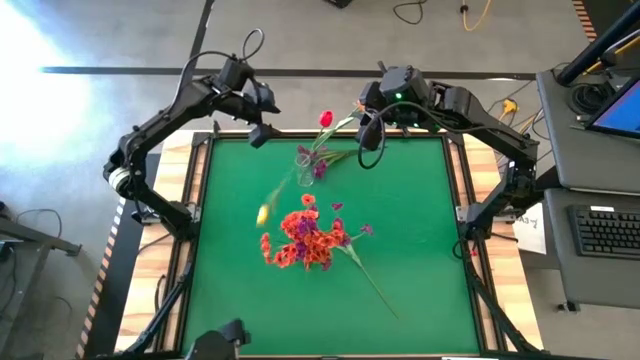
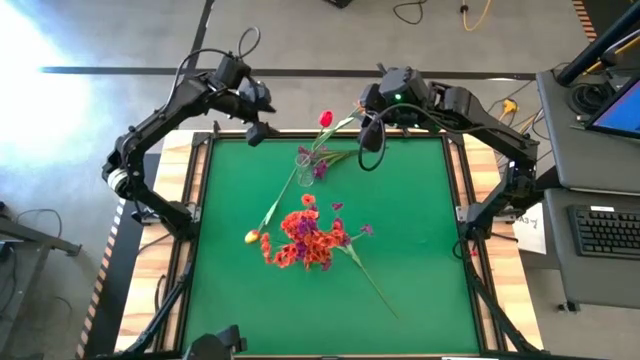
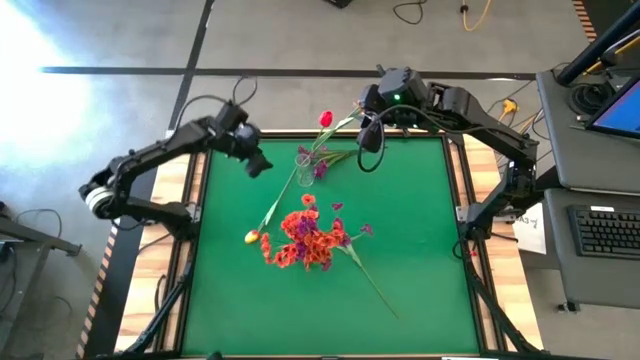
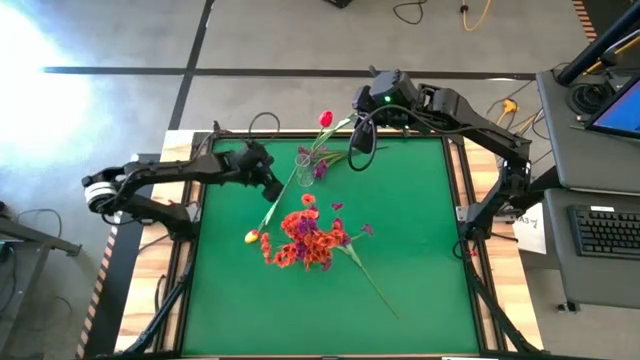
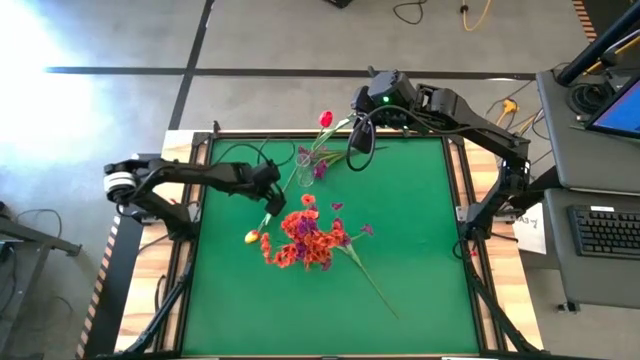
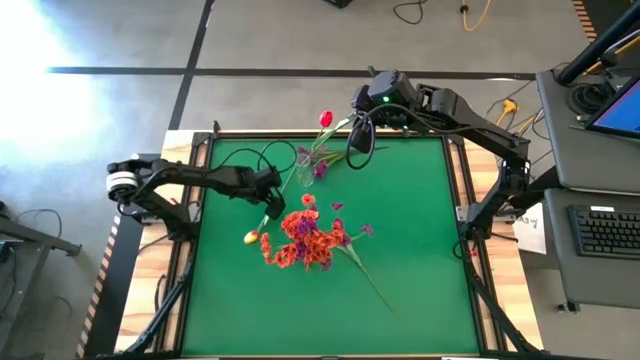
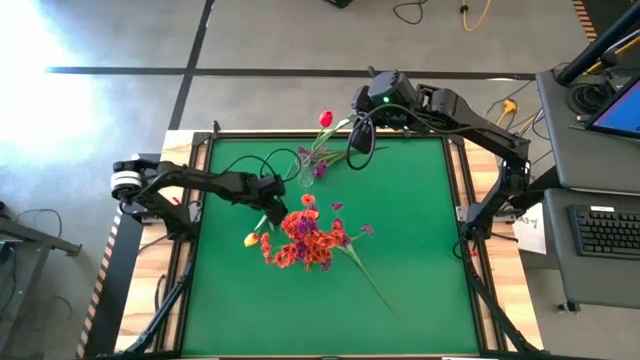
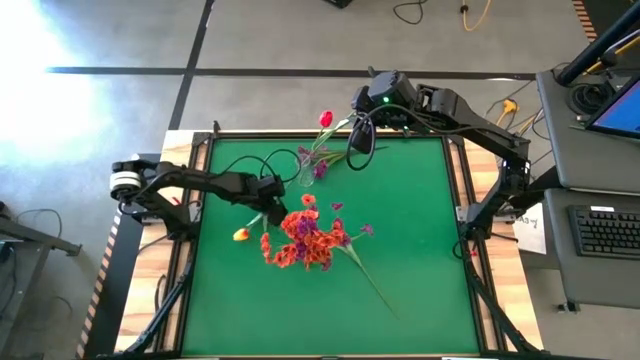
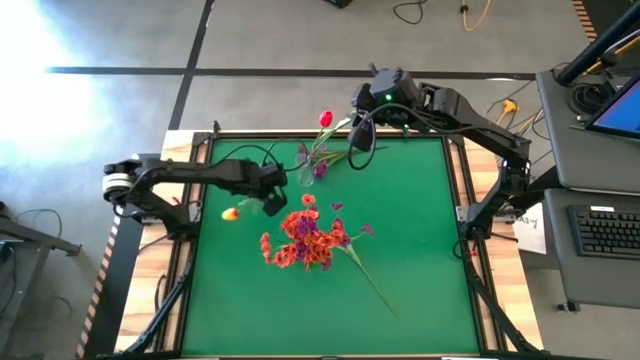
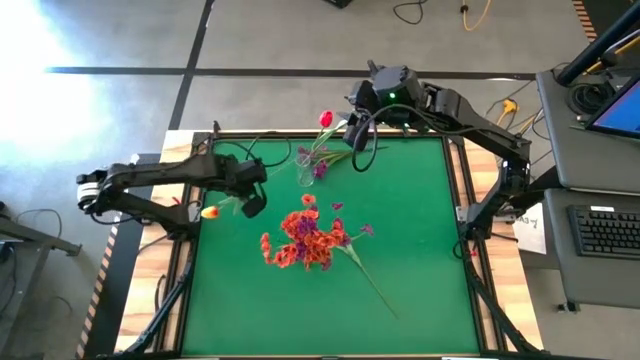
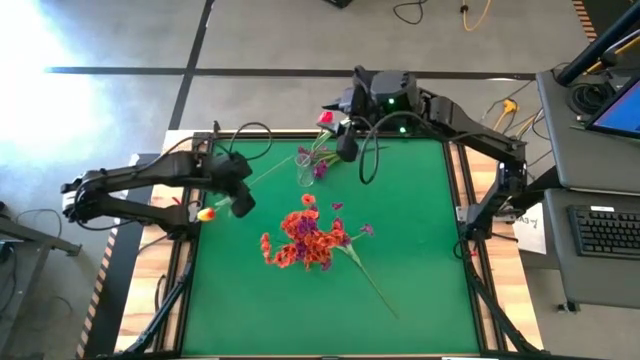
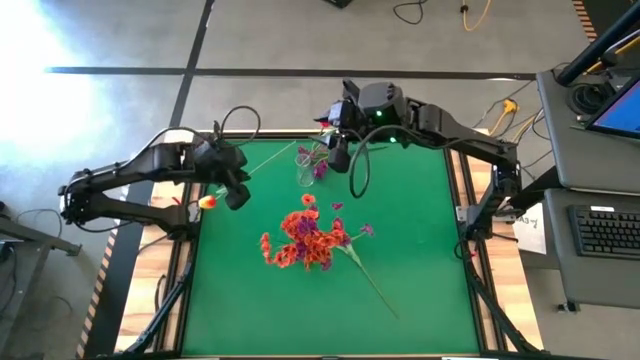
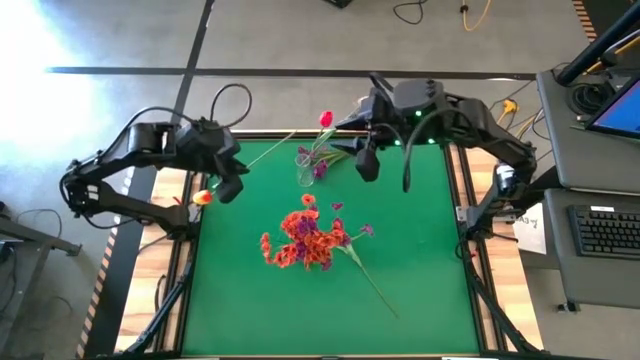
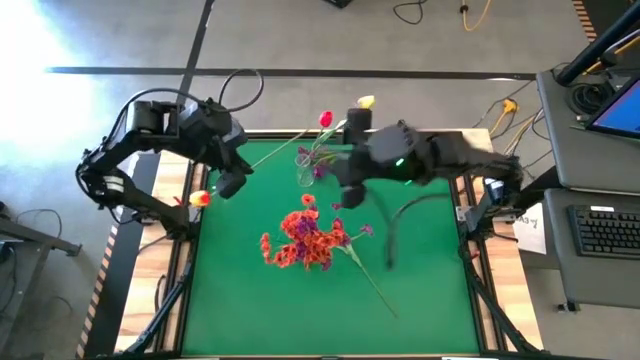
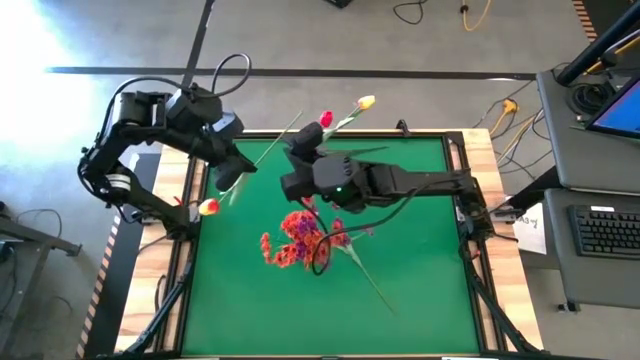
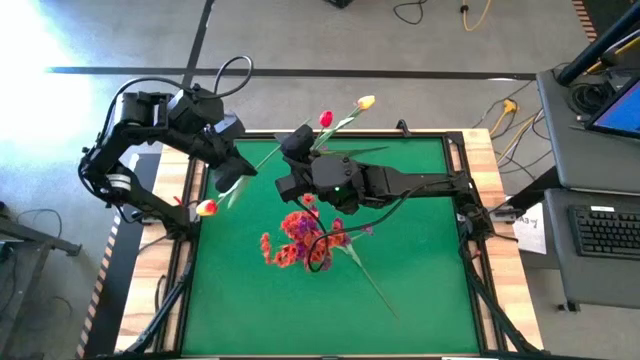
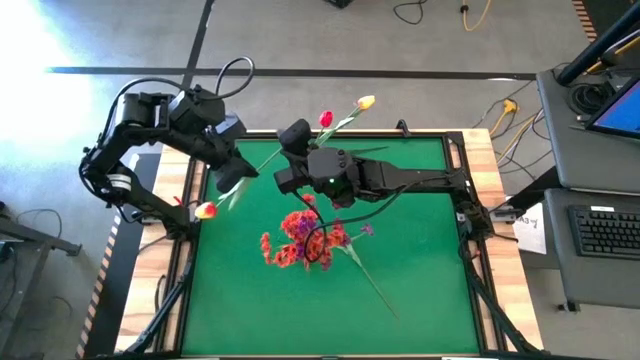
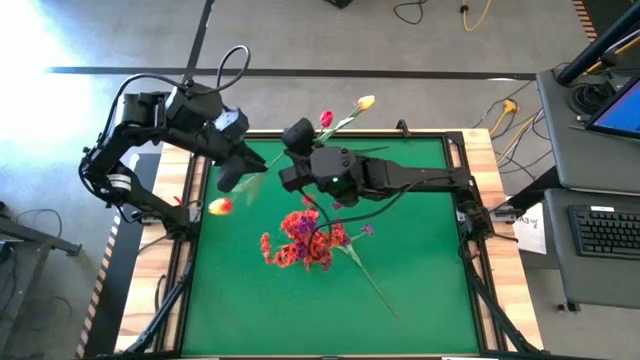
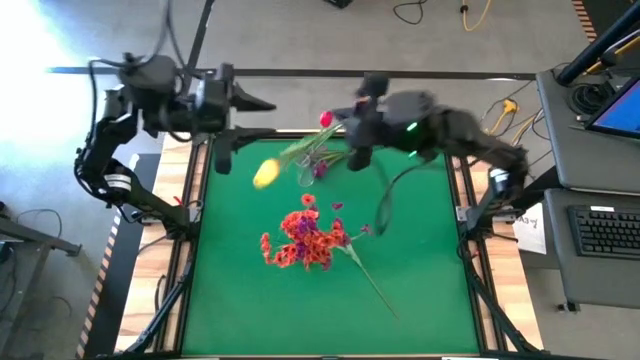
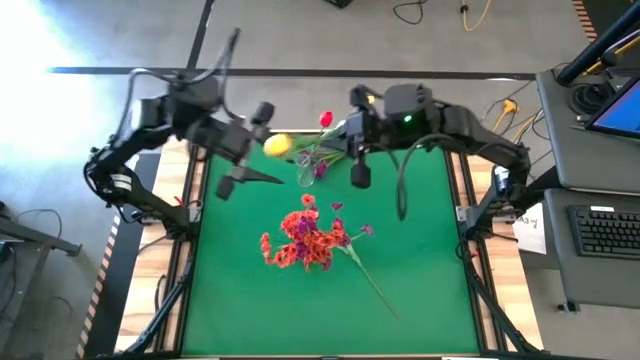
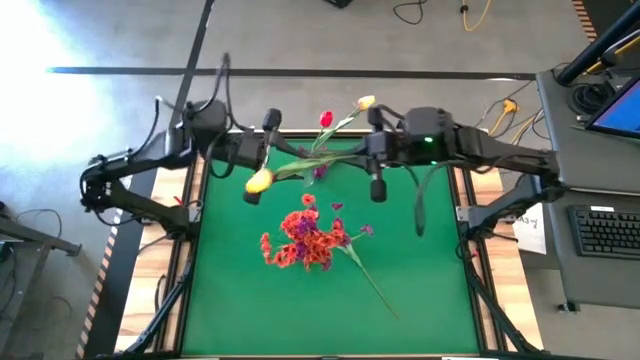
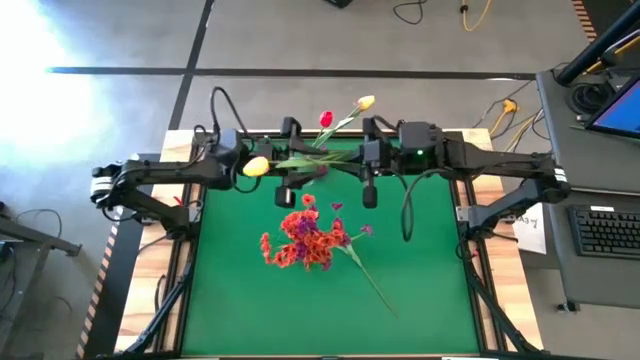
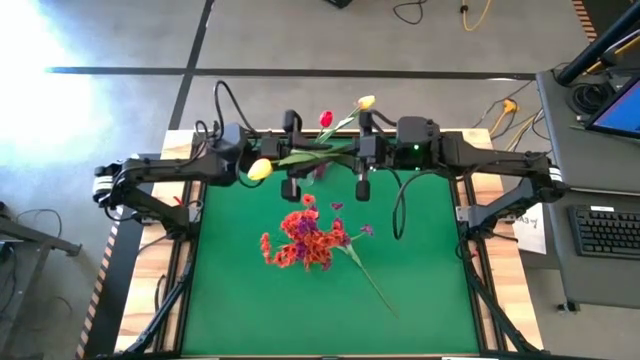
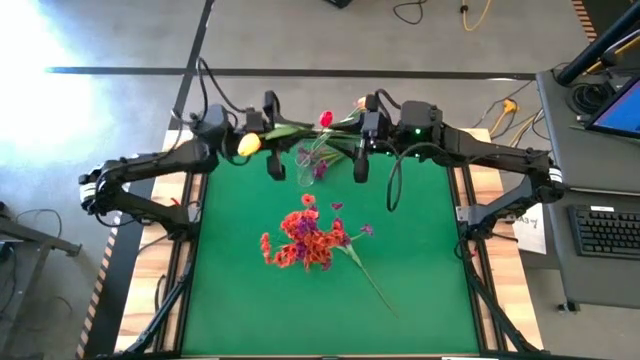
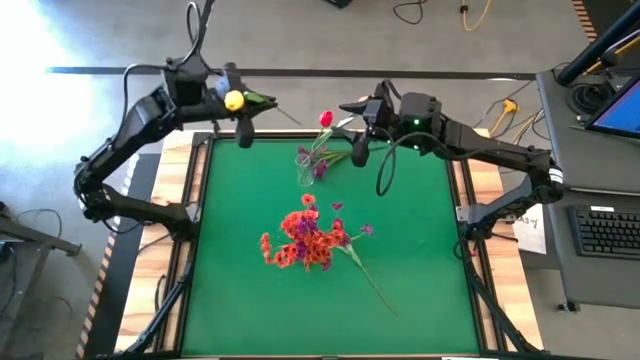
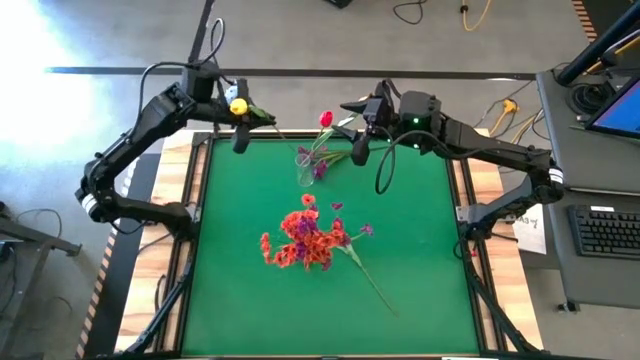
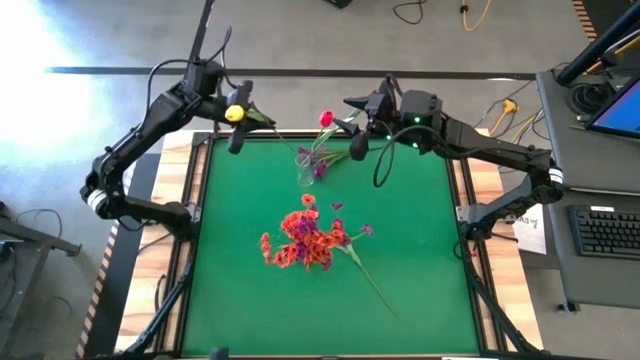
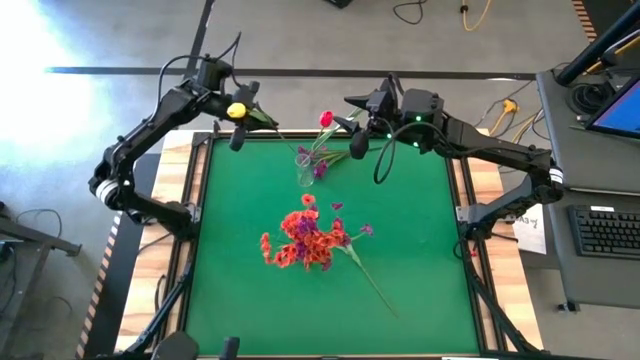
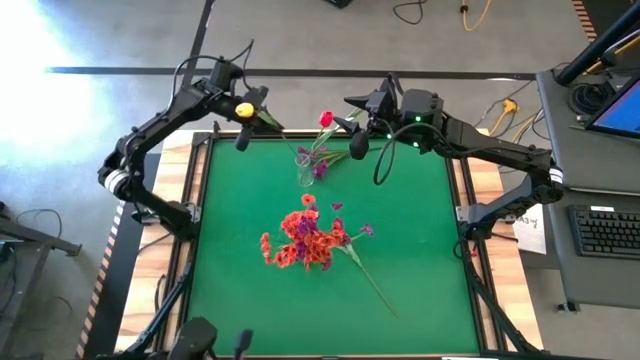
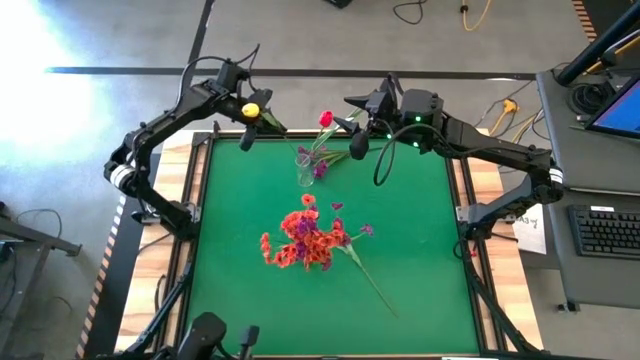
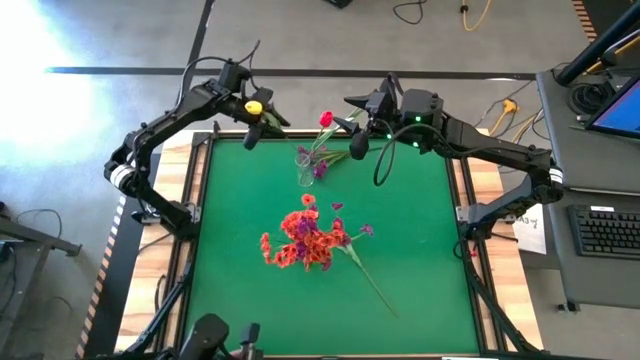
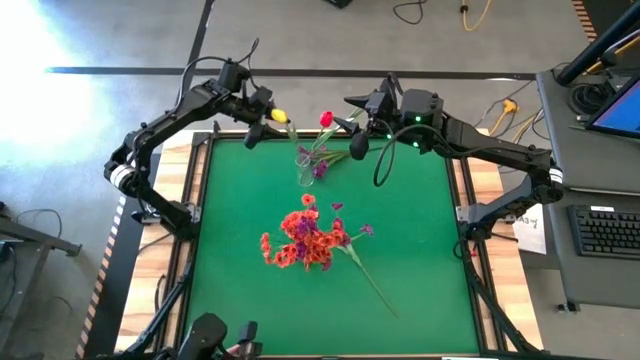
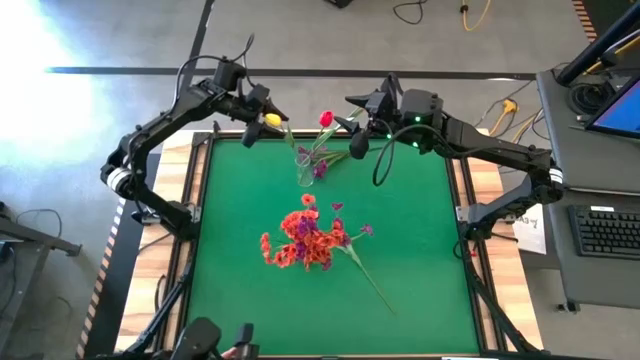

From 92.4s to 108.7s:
Task: Sort flowers into vase by color
Put the yellow tulip into the transparent vase

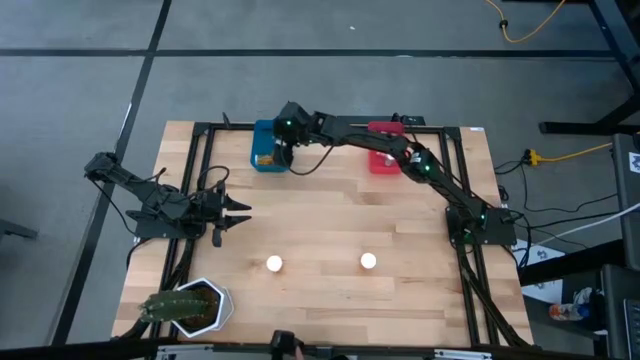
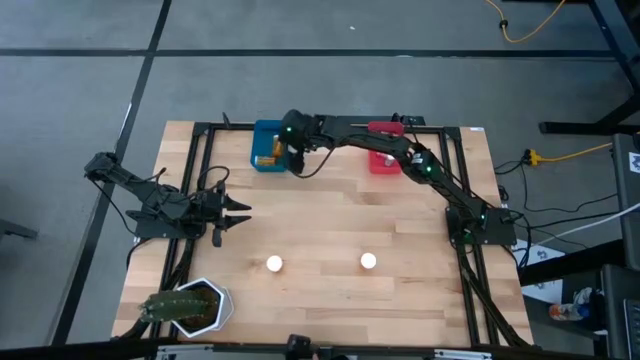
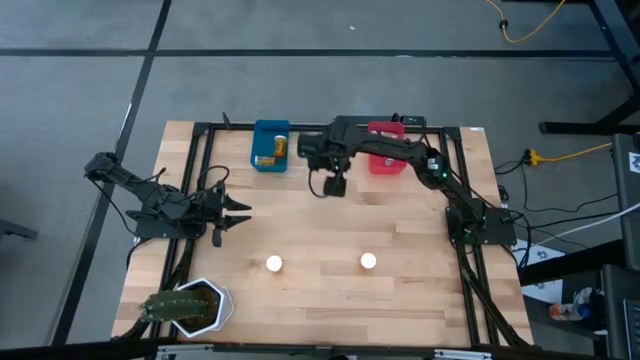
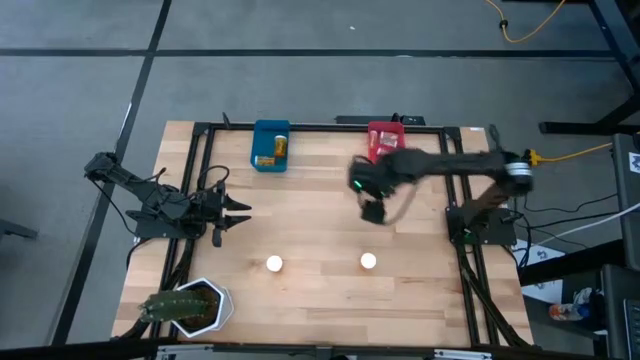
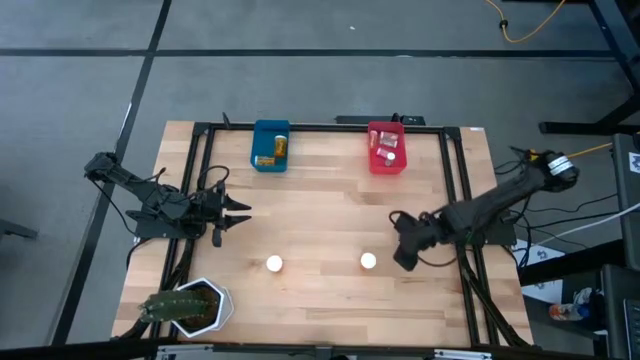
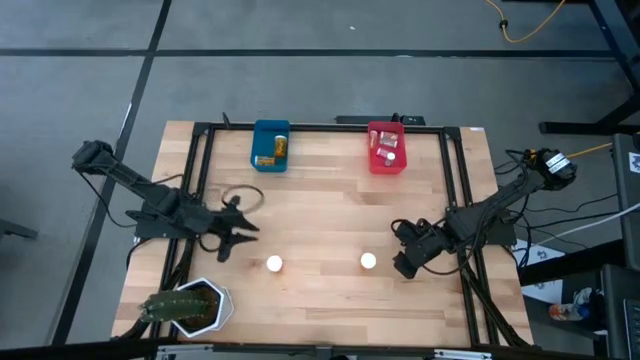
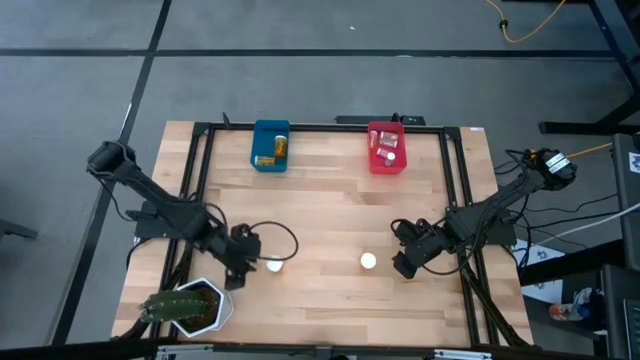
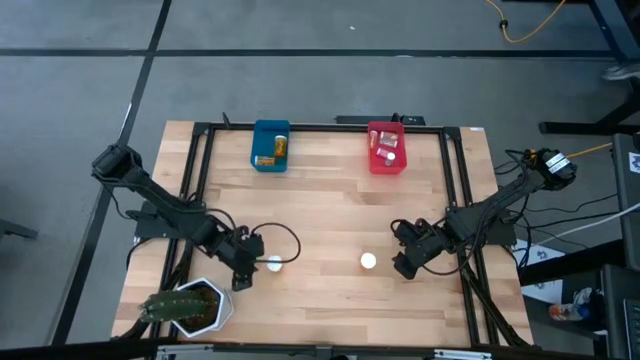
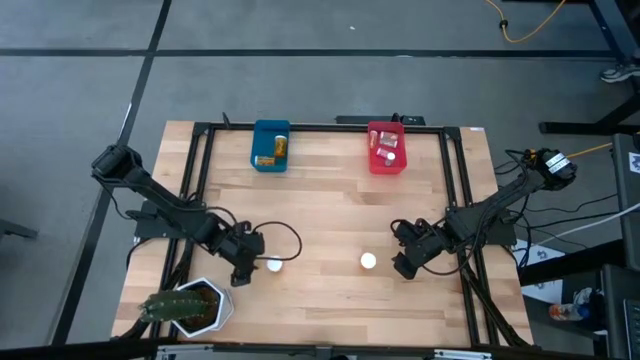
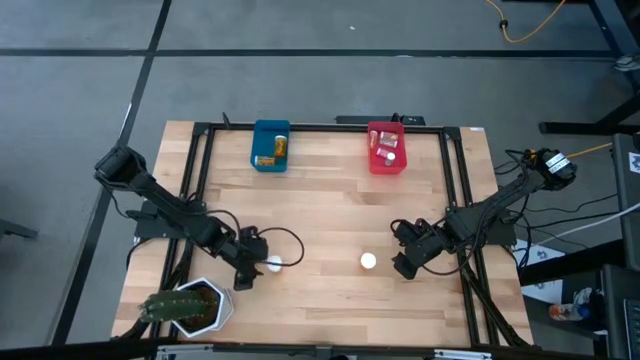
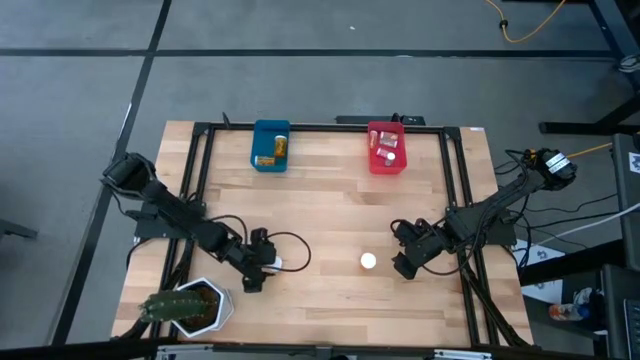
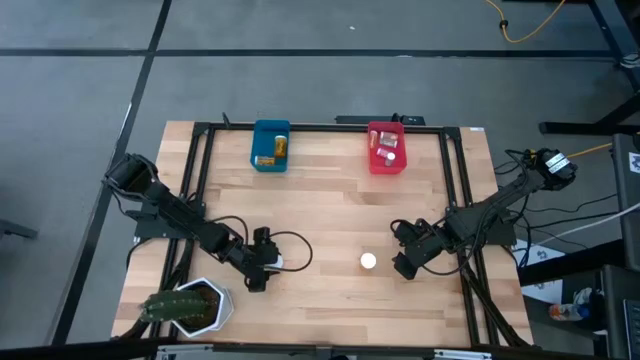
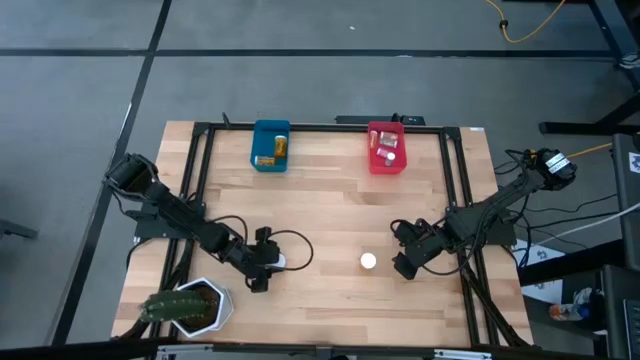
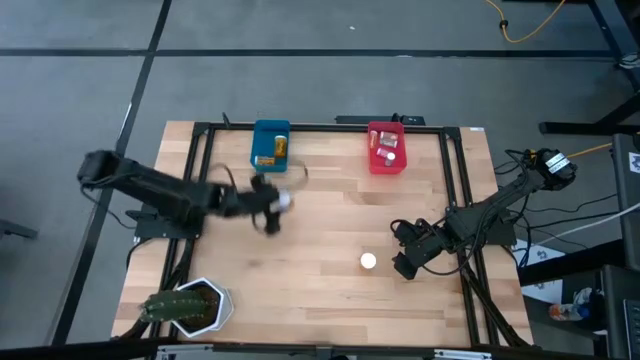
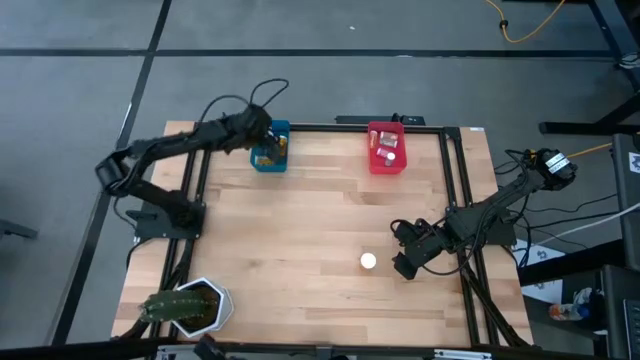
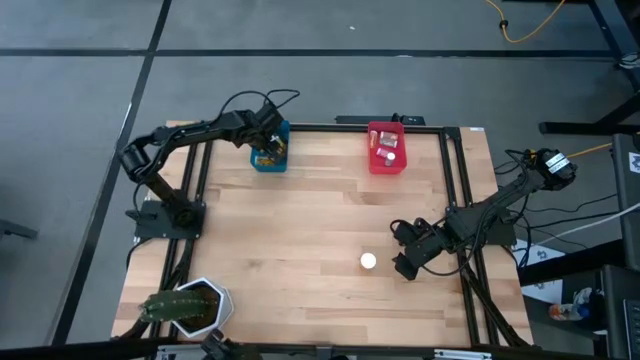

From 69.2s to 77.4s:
Task: Pick and place medicine bottles into bin by pill shape (circle, oval)
Put the big orange pill bottle into the blue bin
